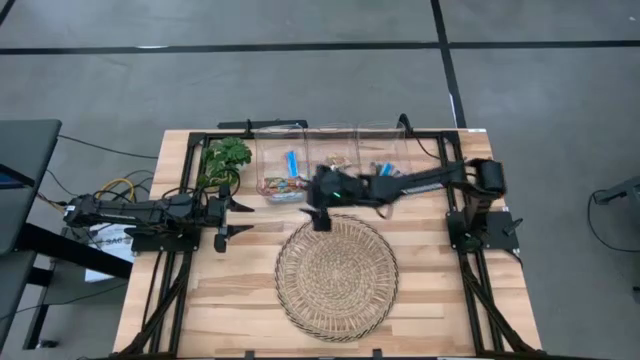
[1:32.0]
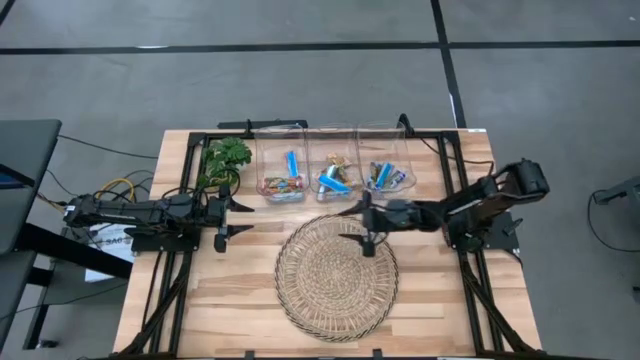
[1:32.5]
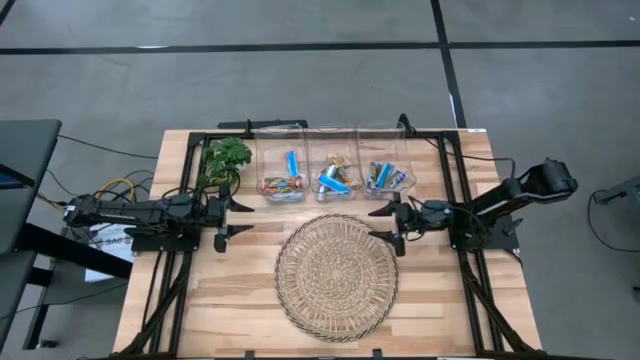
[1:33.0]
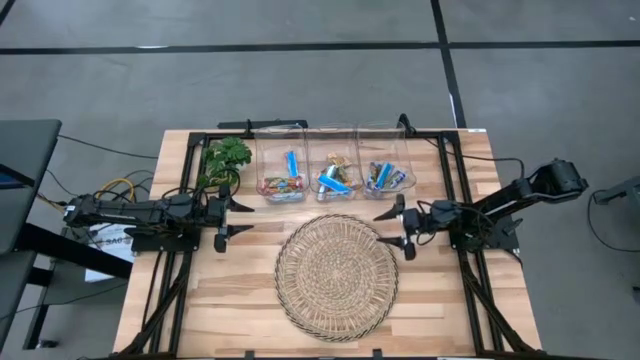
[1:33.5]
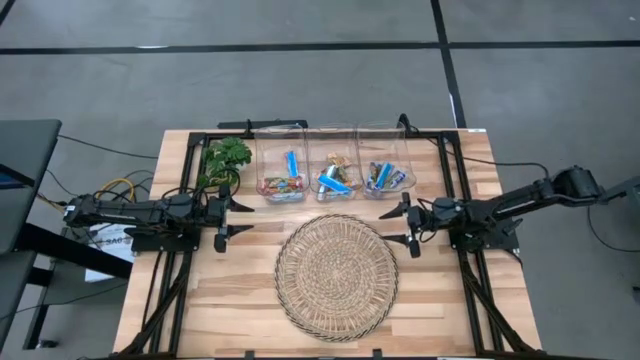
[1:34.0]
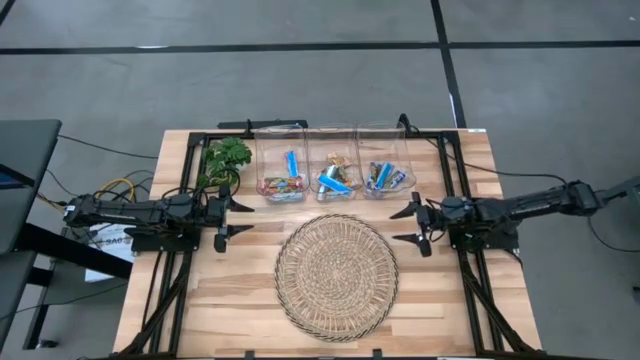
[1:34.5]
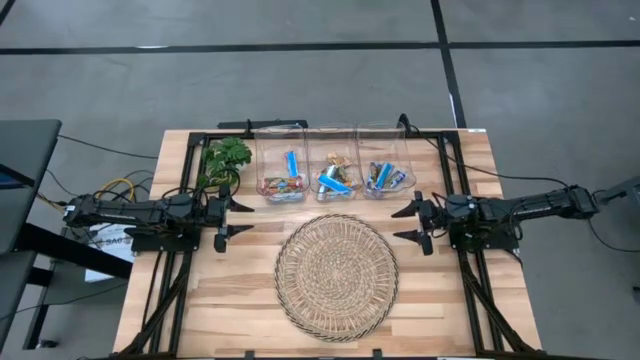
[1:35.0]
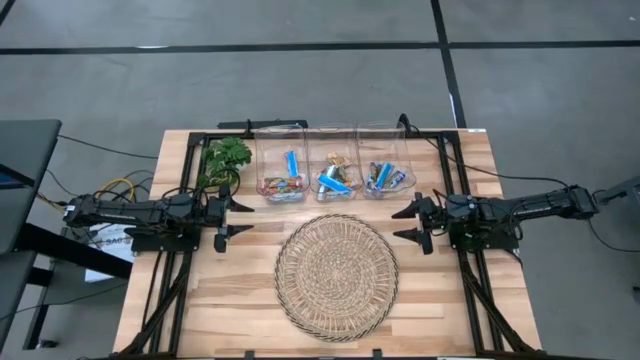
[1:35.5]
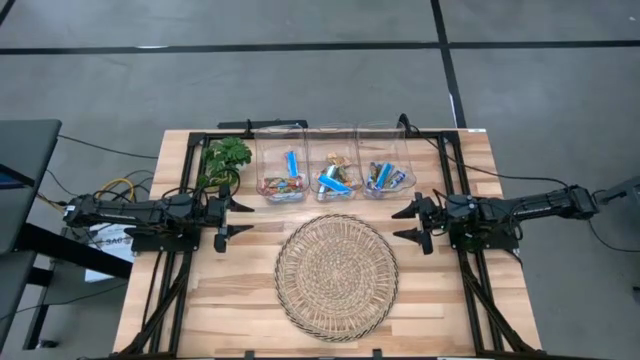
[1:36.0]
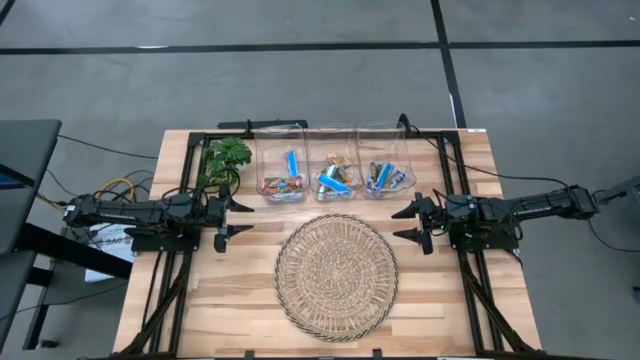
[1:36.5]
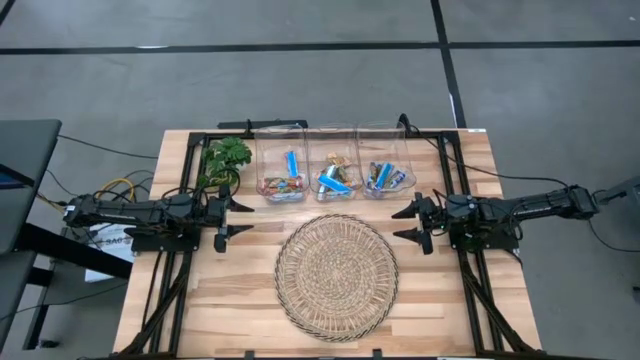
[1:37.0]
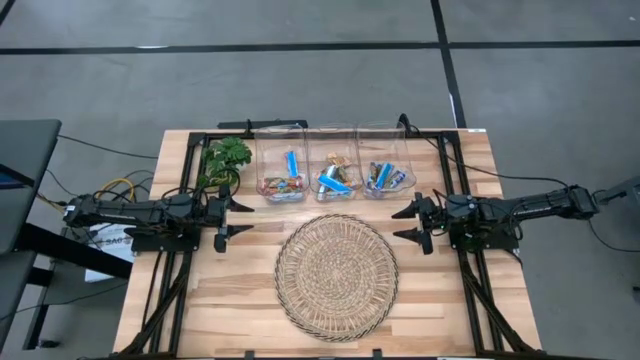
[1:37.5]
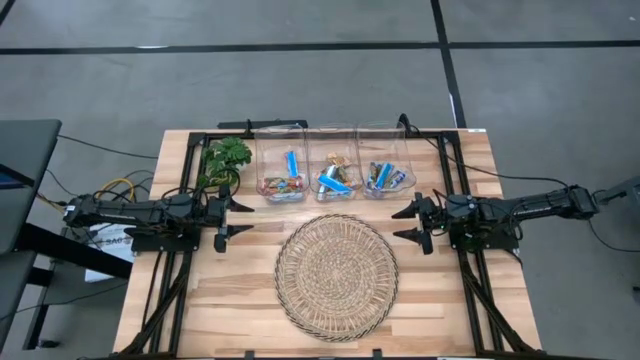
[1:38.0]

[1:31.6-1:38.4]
Task: Pick and place Granola Bars by type
Return to Home Position

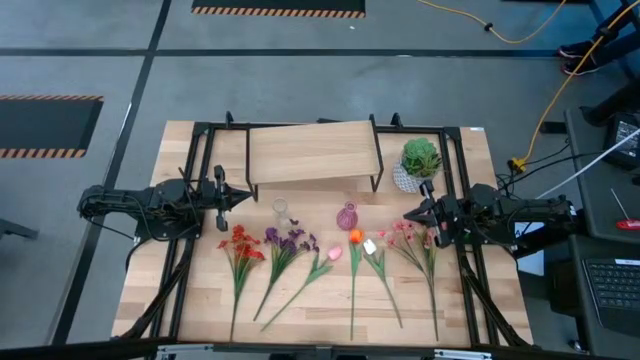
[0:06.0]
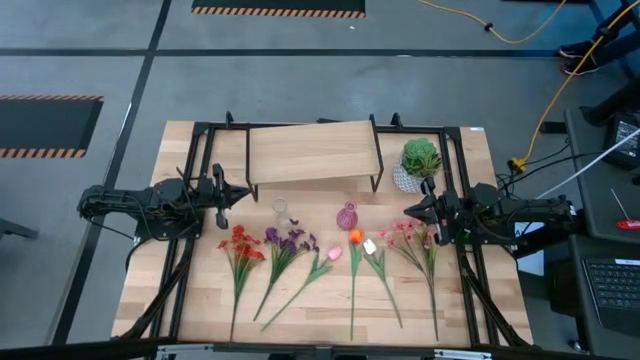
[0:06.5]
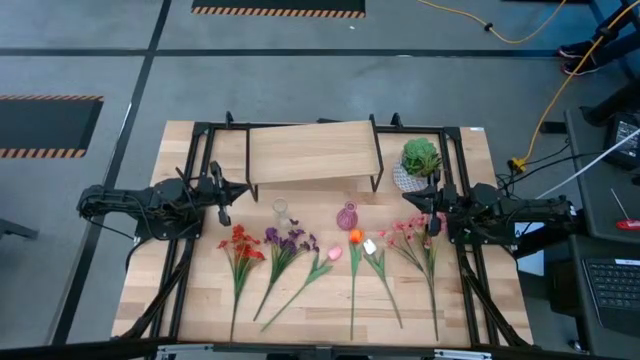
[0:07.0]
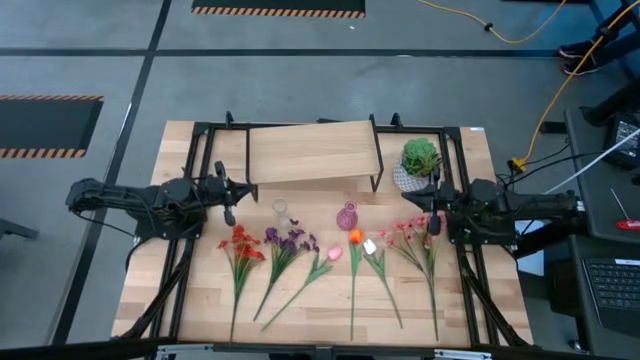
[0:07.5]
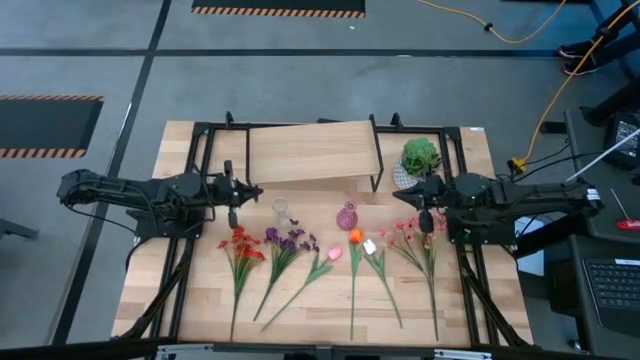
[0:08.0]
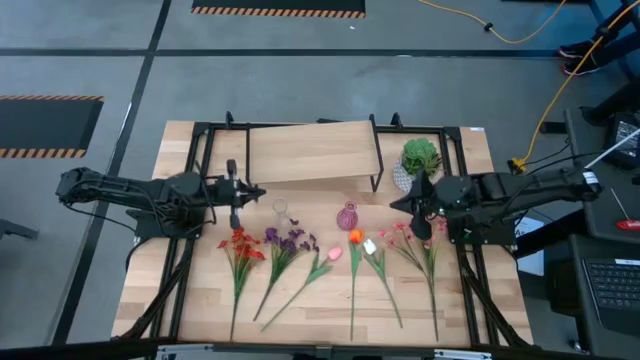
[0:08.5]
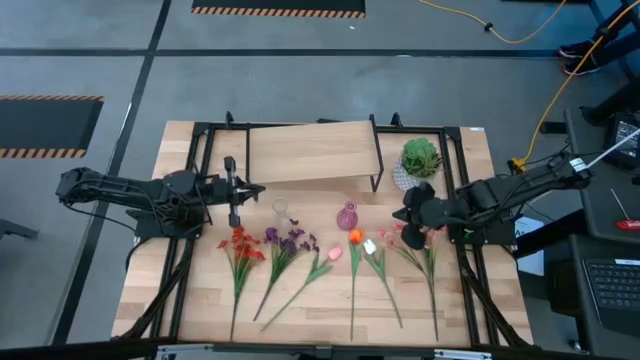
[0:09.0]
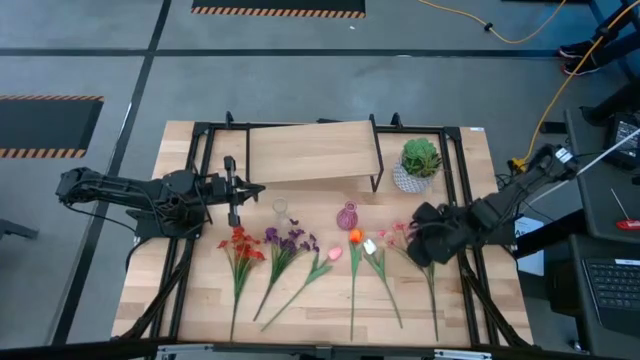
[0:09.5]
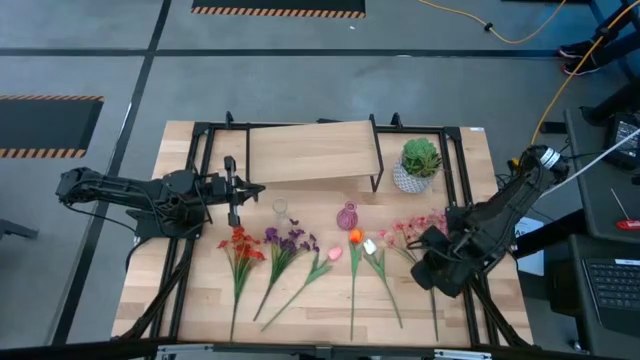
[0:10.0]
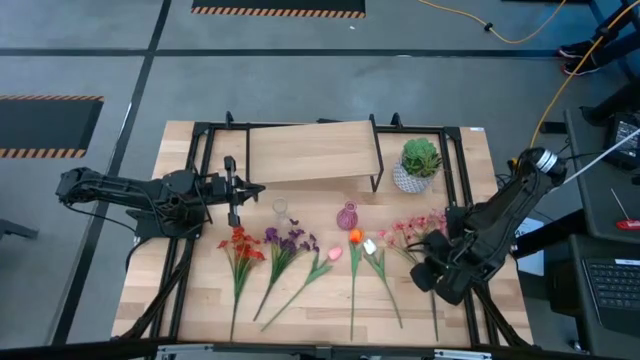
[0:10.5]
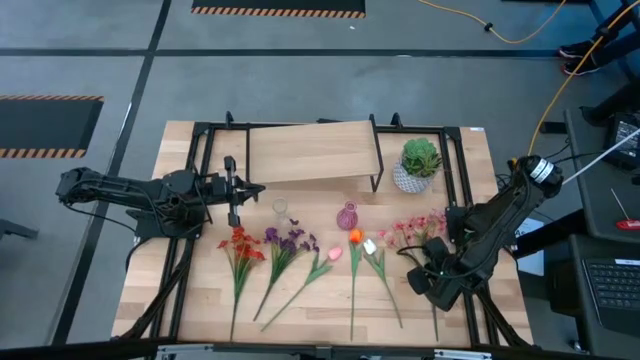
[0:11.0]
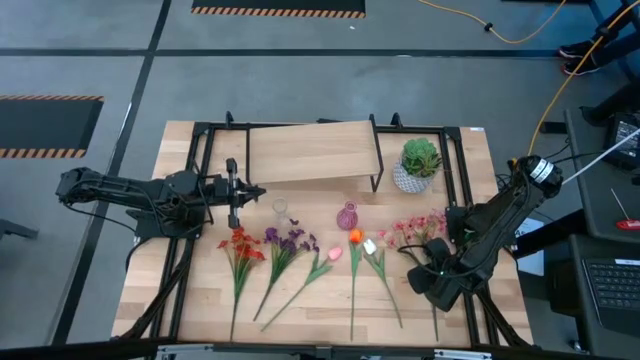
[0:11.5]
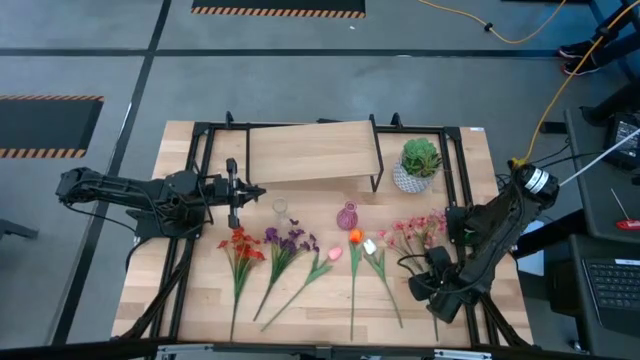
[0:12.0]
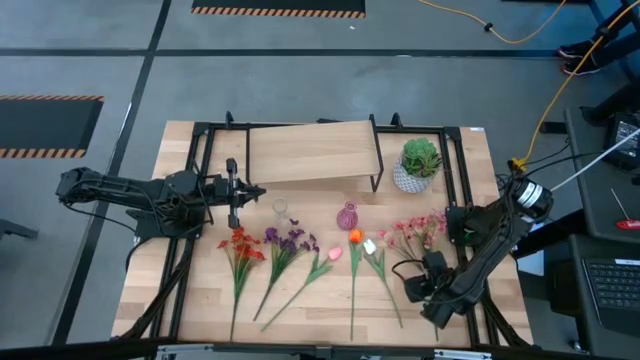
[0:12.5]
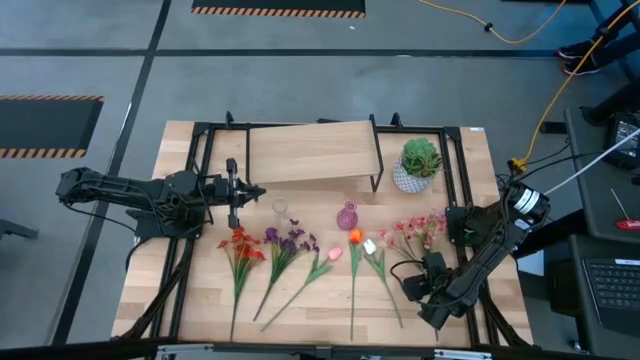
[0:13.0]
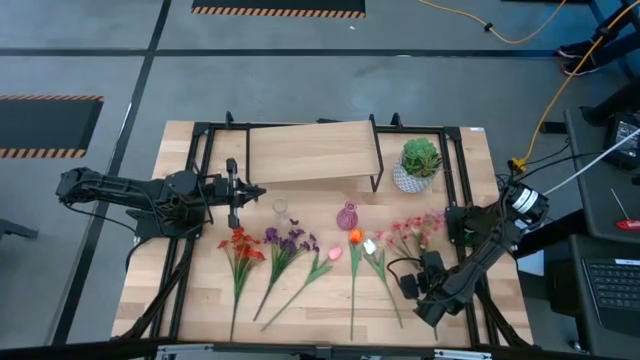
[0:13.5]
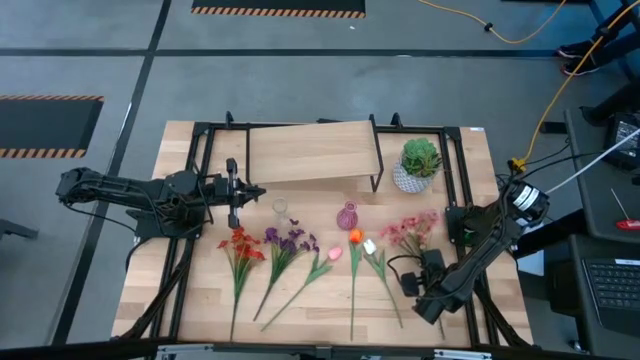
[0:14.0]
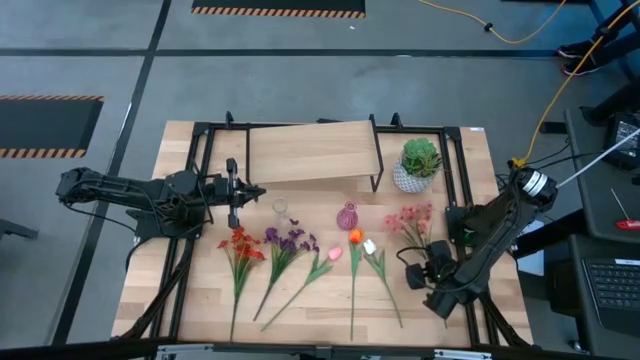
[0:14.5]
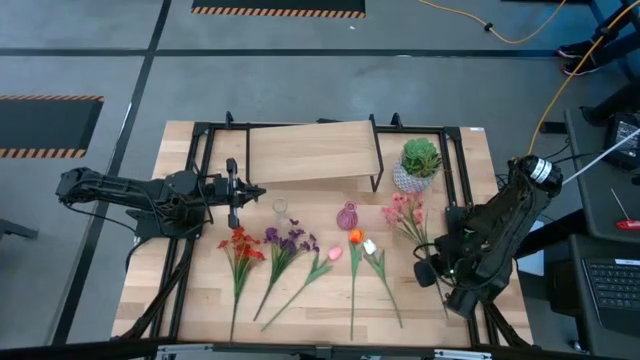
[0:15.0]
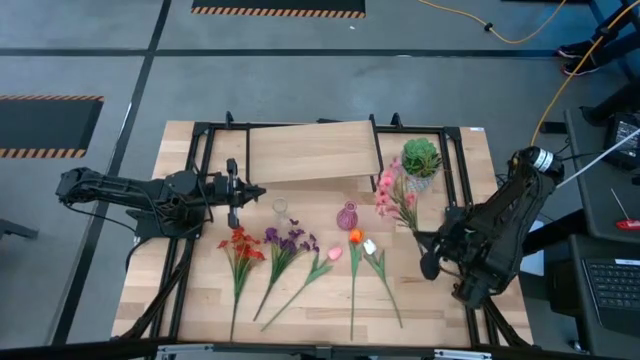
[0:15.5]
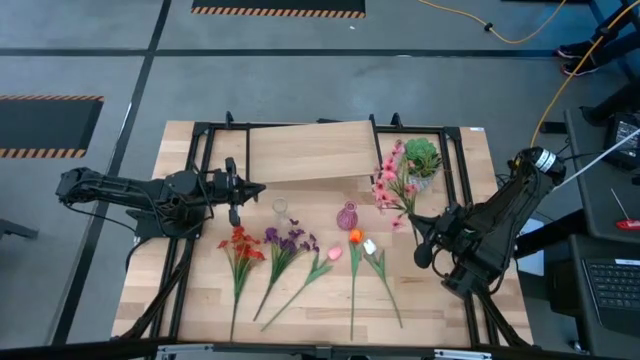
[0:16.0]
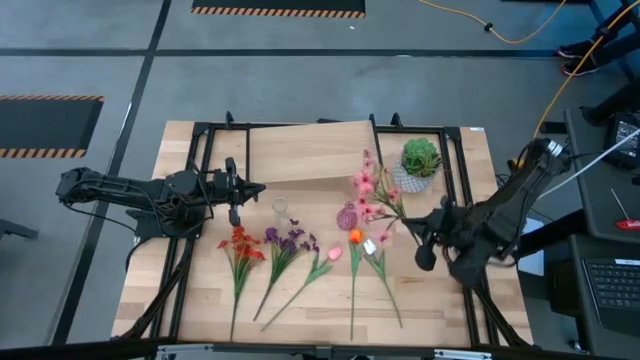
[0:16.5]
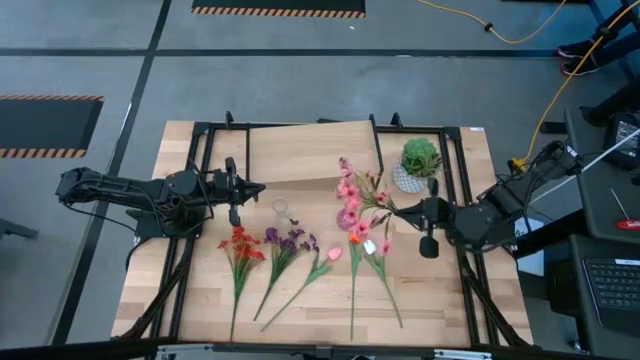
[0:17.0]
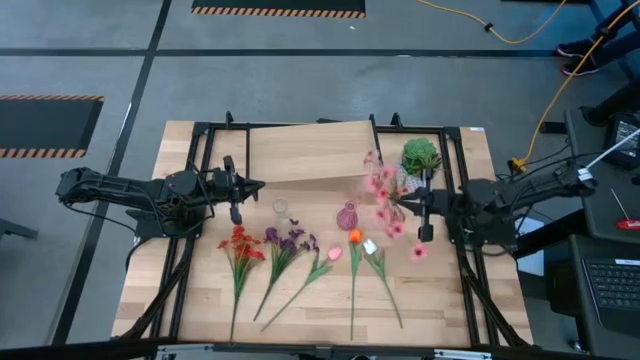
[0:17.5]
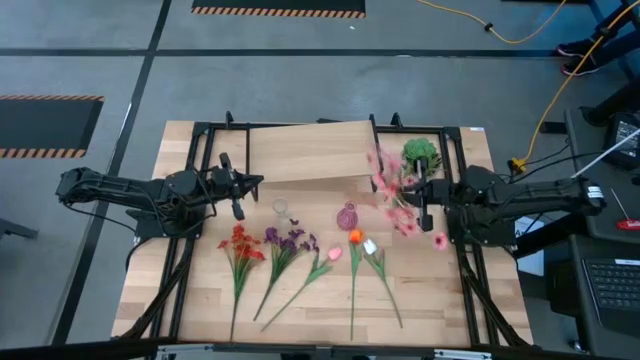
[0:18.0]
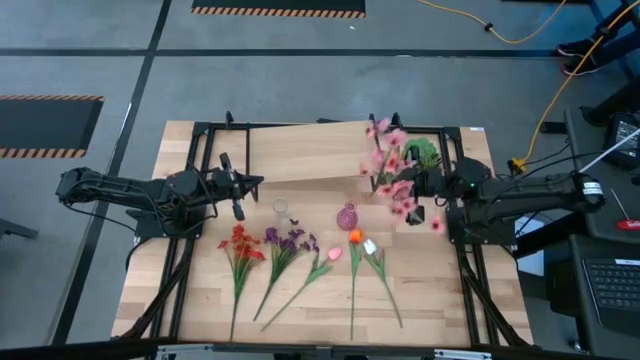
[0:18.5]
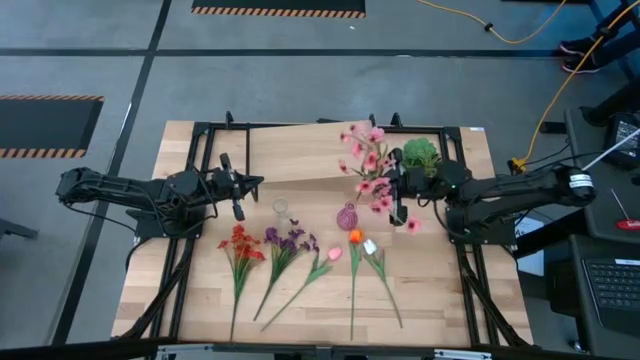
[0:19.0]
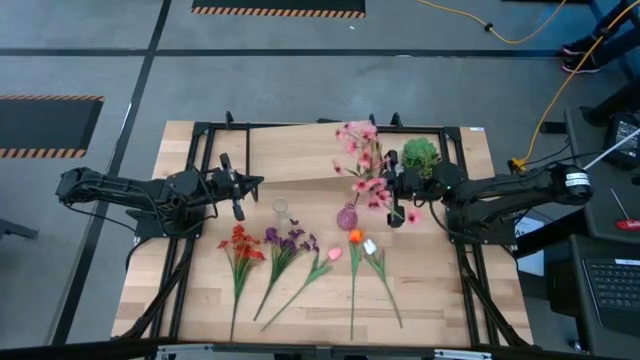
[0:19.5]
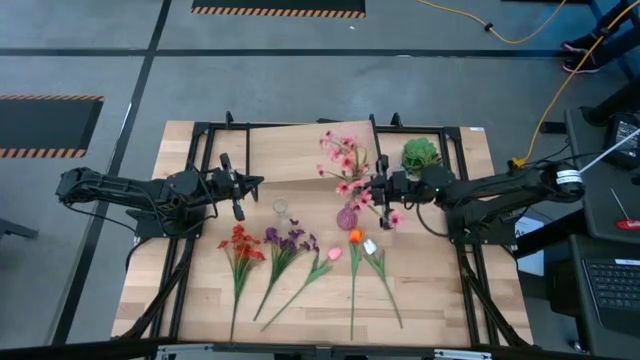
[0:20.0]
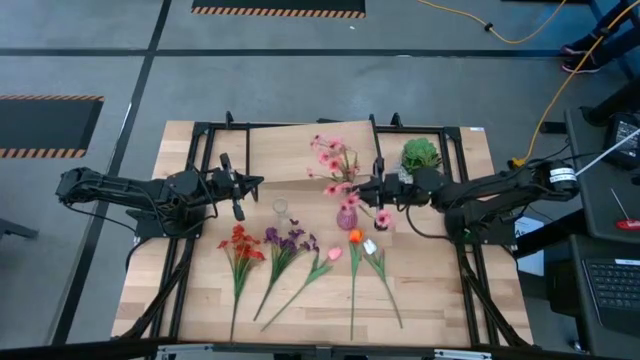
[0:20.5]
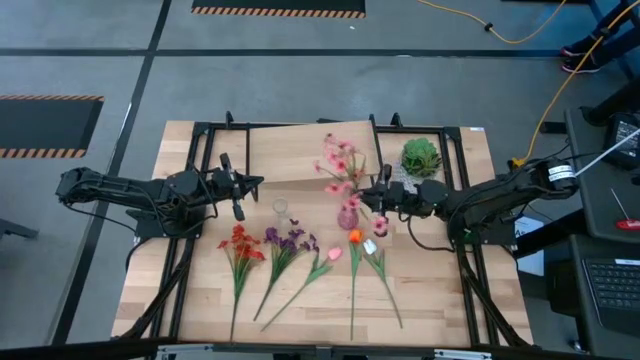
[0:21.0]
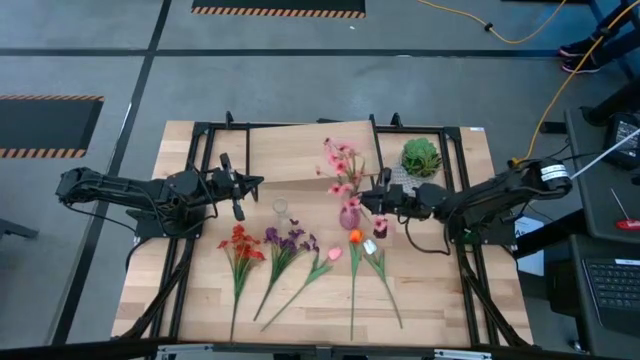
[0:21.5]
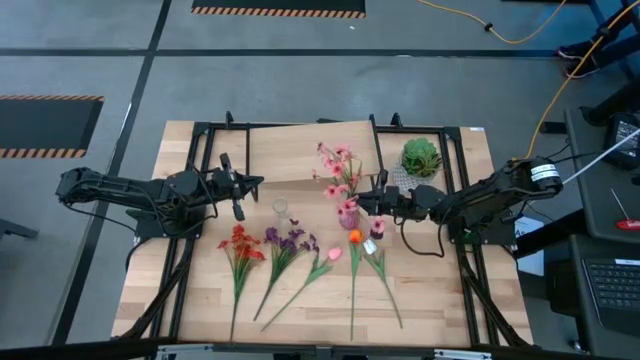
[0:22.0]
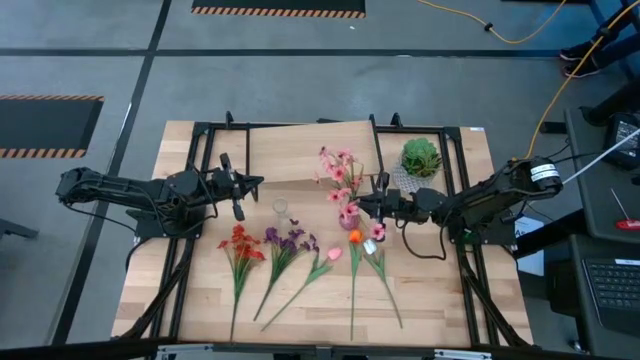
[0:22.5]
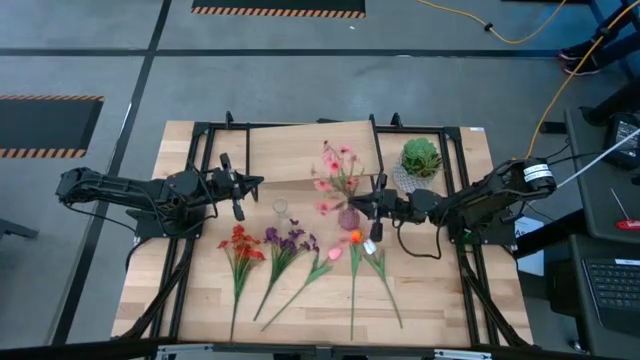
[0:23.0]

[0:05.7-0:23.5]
Task: Pick and place flowers into a vace then onto a shelf
Put the pink flowers into the pink vase
